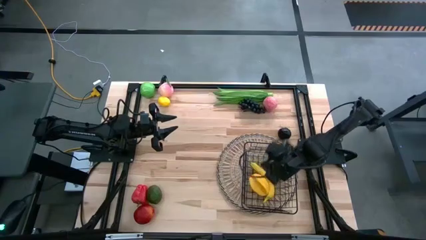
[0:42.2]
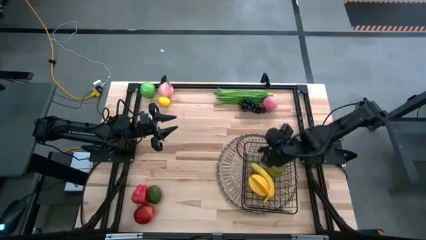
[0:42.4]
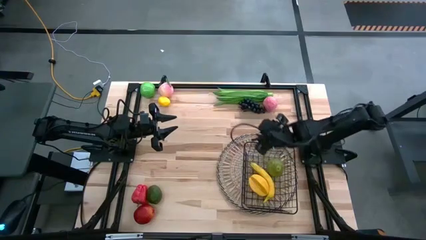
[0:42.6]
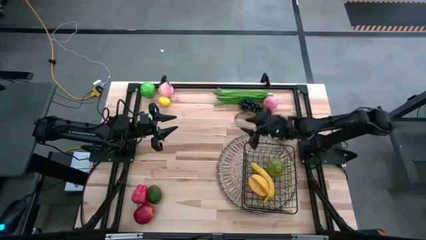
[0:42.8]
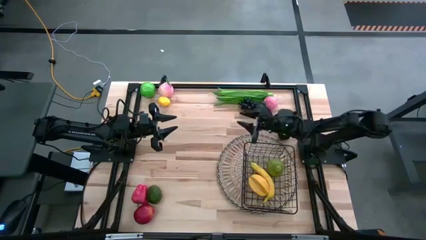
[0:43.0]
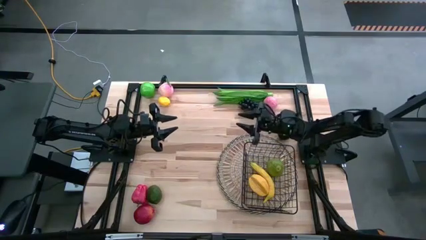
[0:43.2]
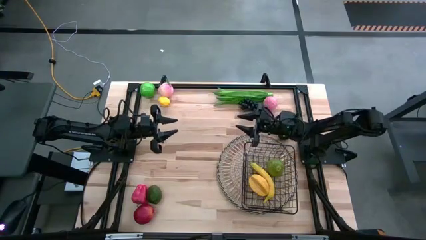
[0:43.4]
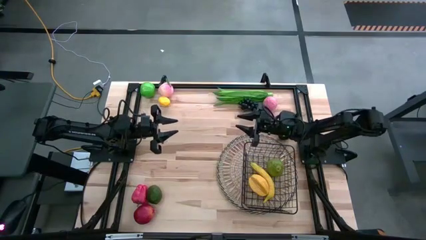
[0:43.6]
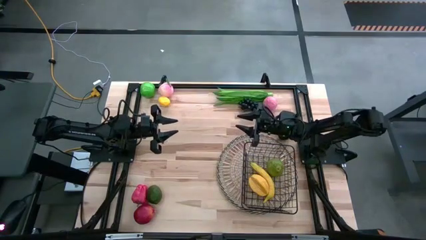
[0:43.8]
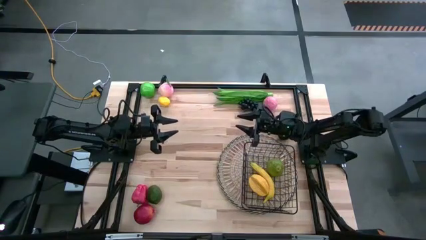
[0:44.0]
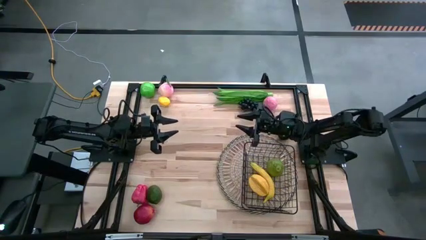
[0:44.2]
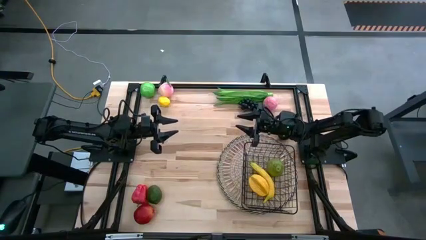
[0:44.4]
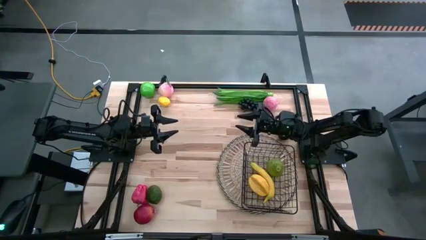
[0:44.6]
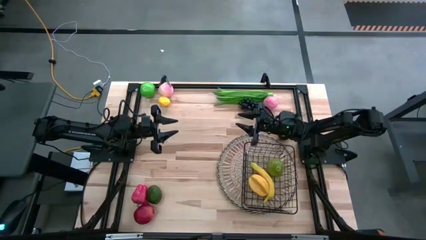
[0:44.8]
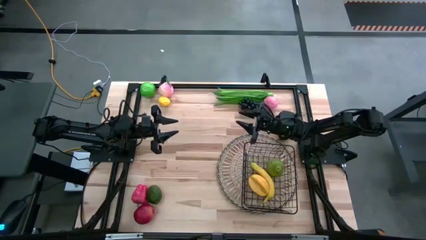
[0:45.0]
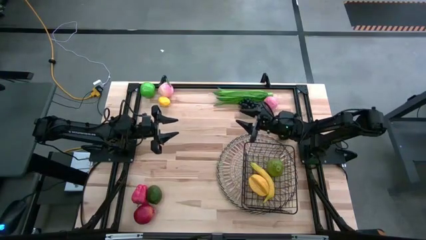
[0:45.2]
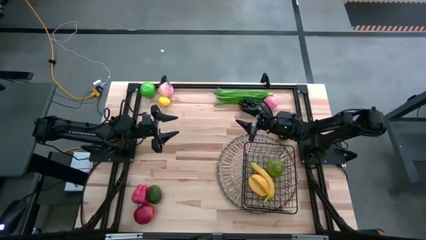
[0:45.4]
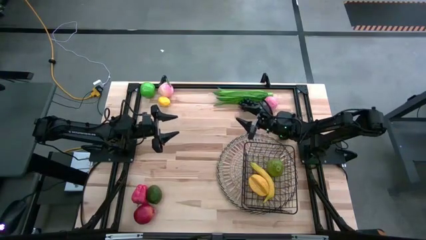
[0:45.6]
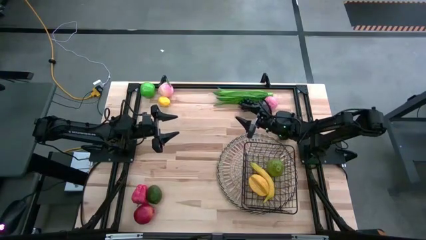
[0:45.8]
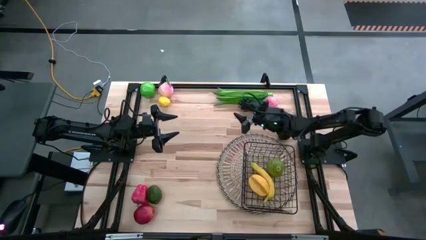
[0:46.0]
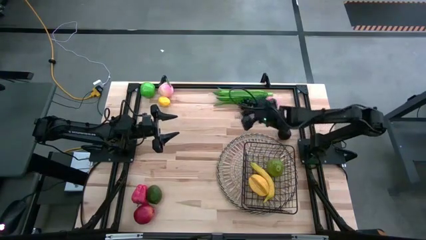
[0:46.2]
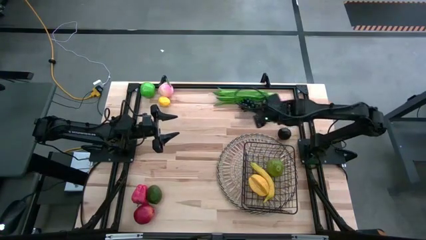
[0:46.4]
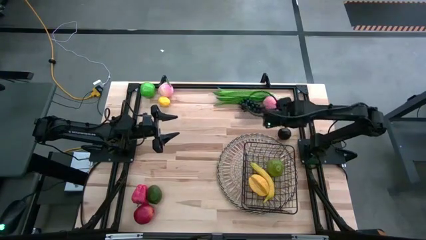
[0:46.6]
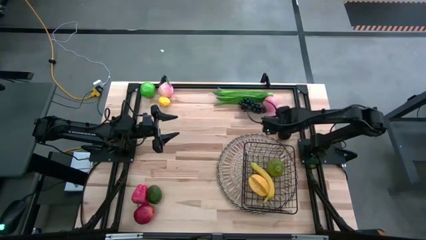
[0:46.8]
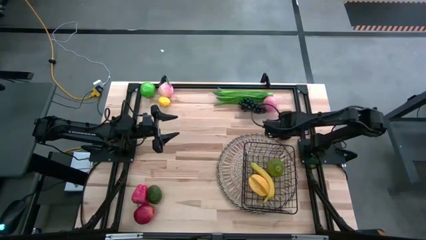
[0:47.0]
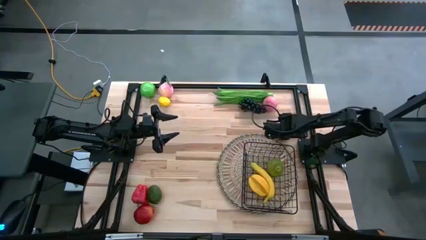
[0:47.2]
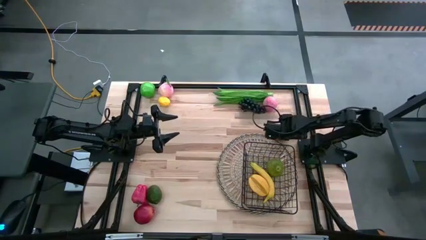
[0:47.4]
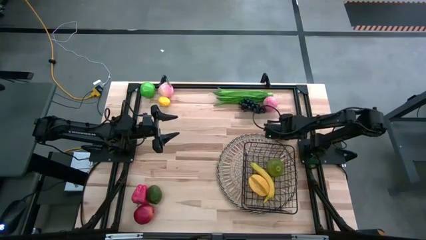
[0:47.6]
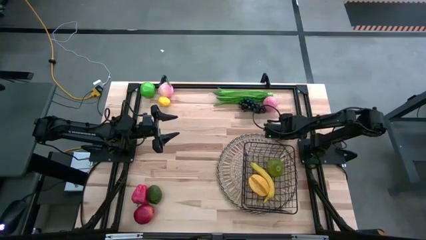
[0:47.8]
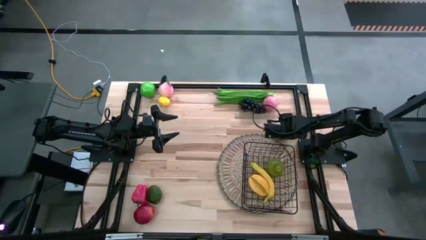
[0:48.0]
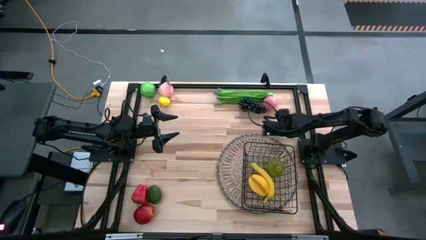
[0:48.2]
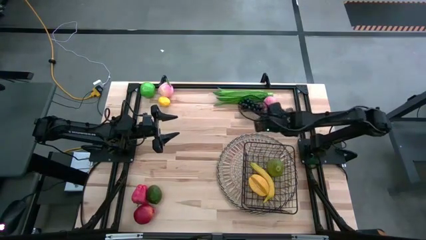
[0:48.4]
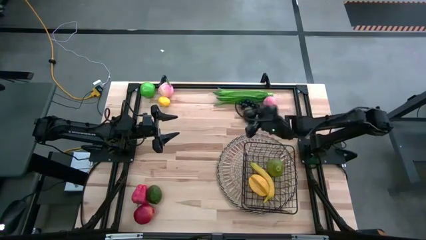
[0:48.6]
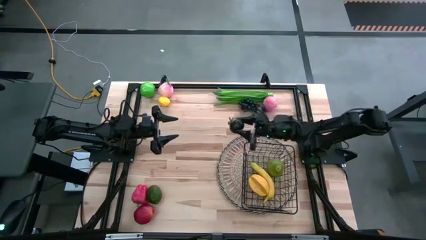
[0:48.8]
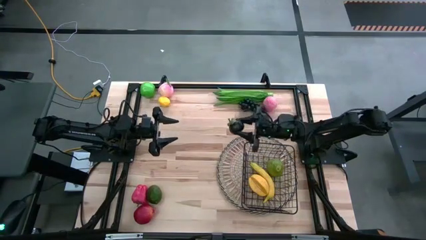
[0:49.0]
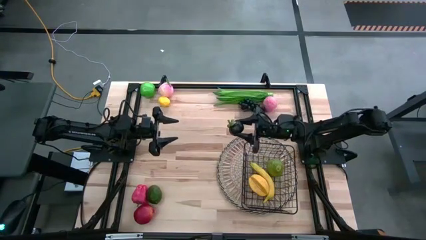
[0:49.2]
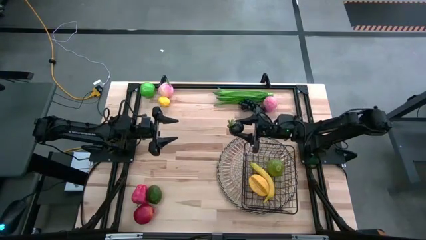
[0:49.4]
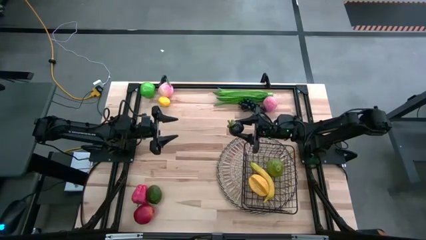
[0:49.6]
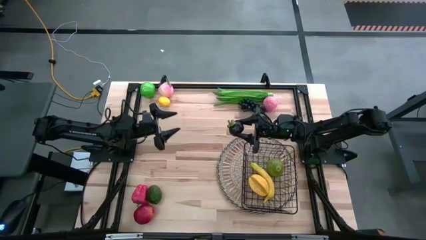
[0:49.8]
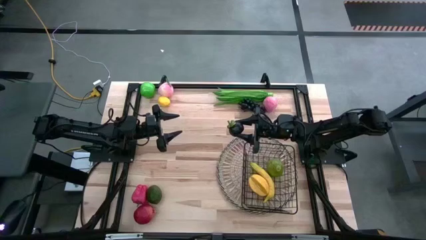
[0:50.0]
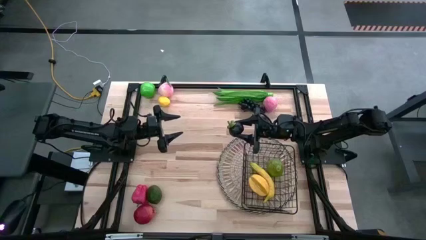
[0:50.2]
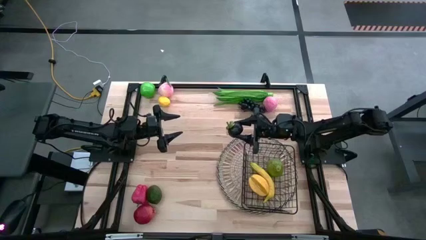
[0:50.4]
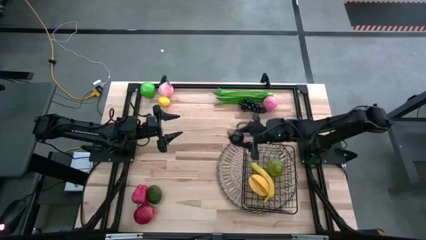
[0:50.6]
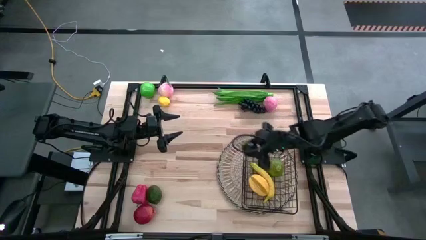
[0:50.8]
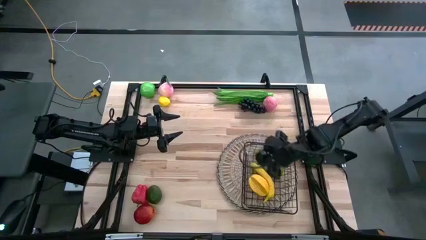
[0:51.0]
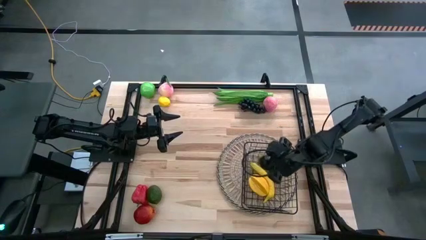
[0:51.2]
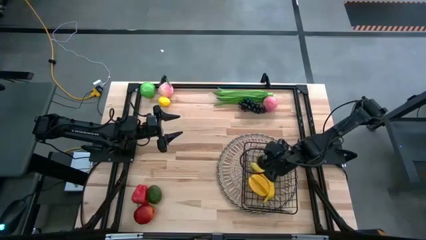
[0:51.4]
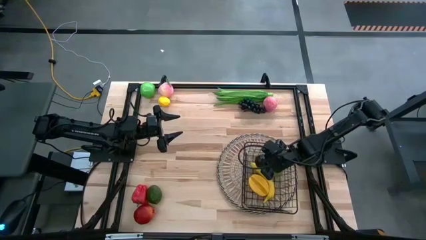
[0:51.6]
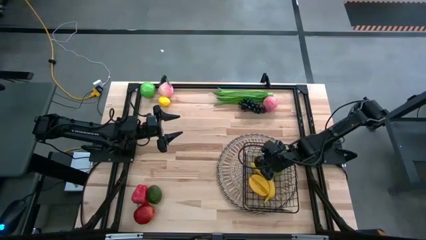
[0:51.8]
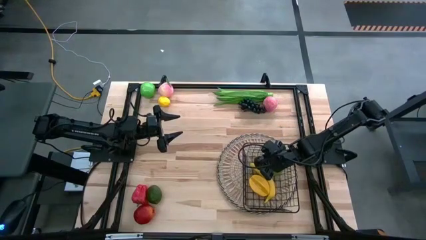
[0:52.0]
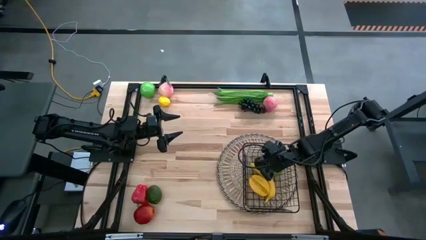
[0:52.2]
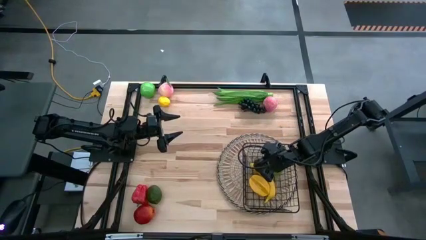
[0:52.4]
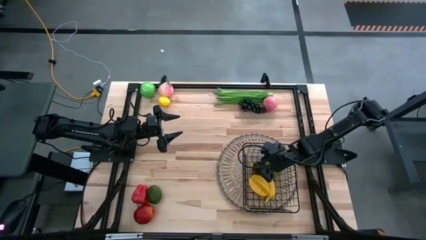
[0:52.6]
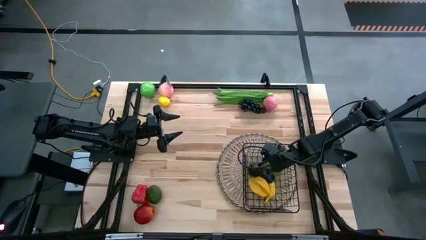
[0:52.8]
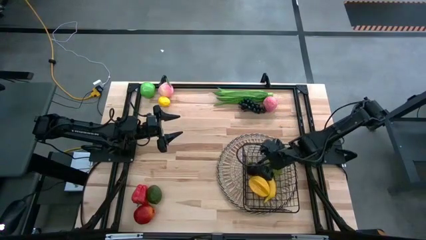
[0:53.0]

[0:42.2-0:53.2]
Task: Build produce basket
Put the mangosteen into the wire basket
